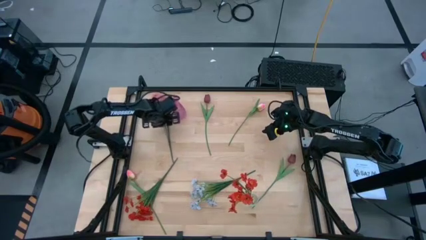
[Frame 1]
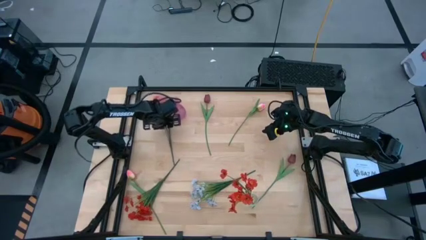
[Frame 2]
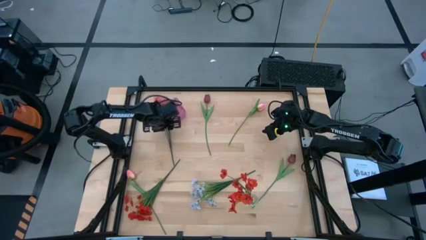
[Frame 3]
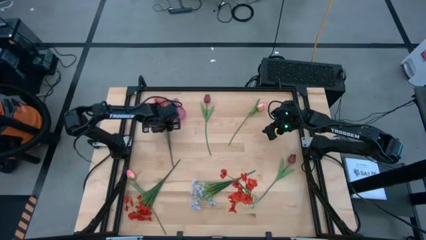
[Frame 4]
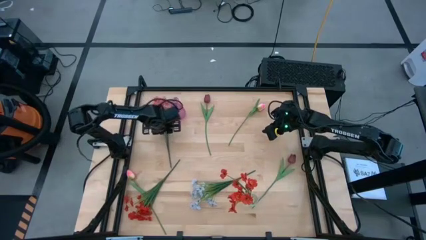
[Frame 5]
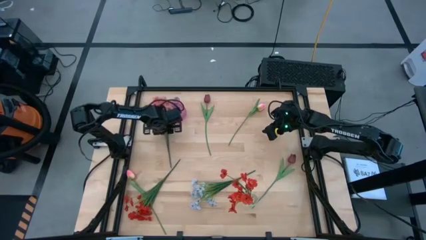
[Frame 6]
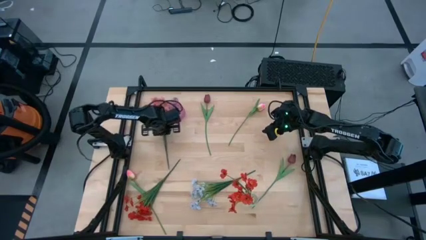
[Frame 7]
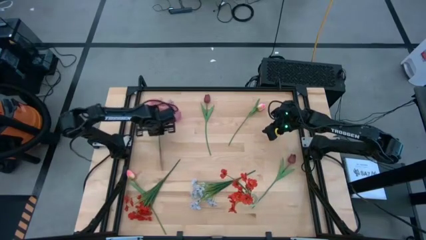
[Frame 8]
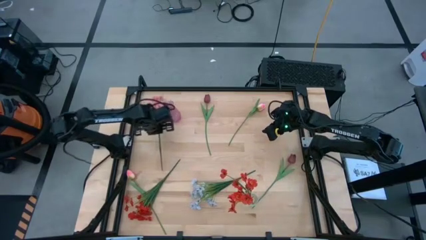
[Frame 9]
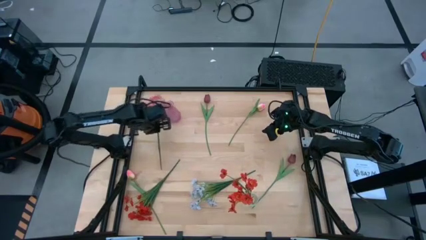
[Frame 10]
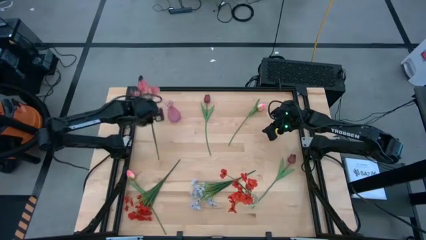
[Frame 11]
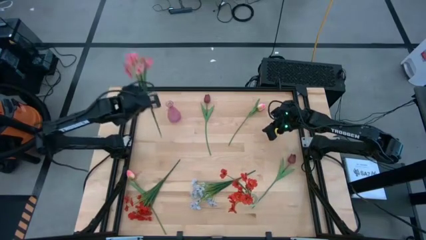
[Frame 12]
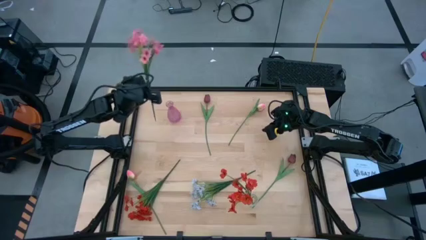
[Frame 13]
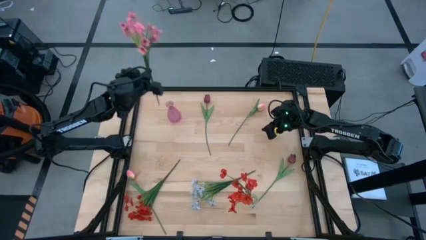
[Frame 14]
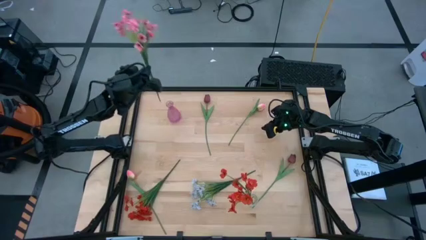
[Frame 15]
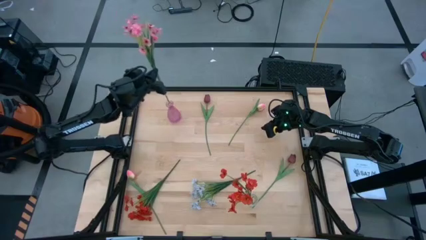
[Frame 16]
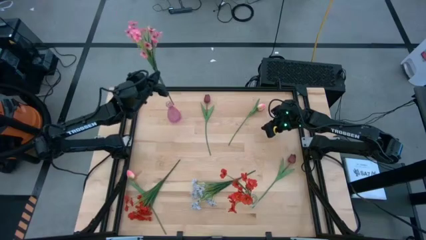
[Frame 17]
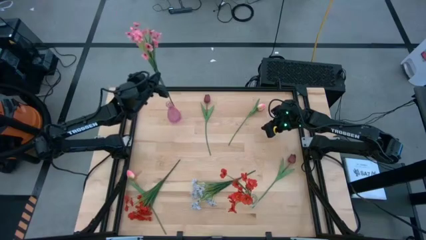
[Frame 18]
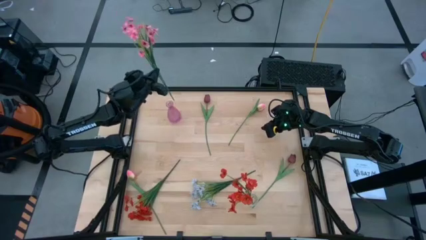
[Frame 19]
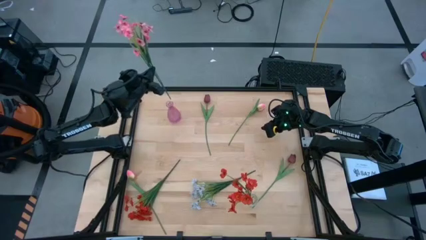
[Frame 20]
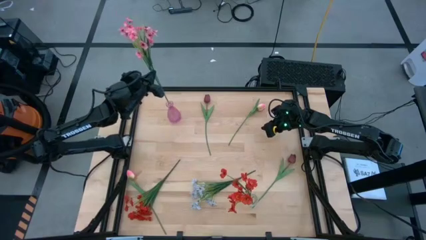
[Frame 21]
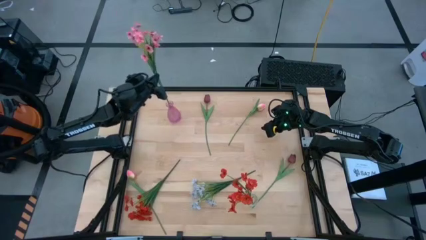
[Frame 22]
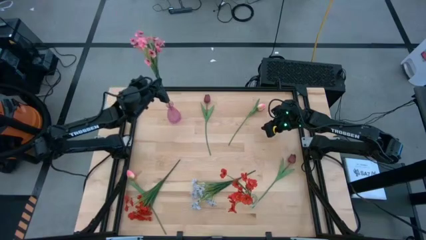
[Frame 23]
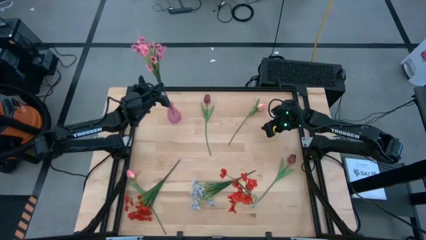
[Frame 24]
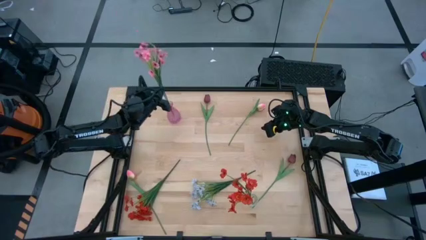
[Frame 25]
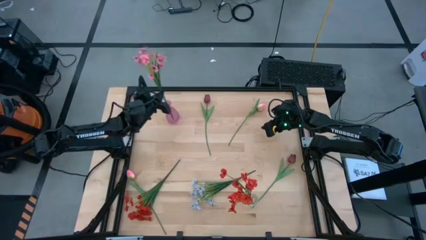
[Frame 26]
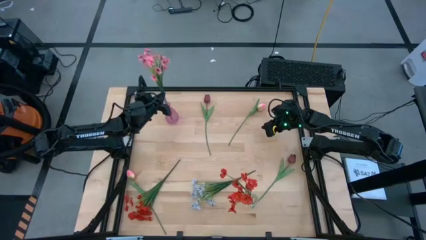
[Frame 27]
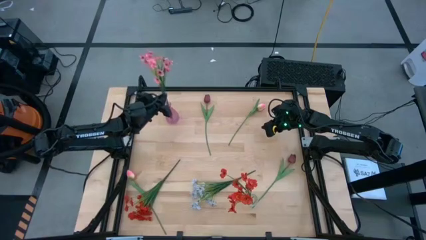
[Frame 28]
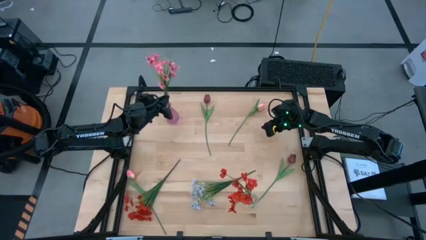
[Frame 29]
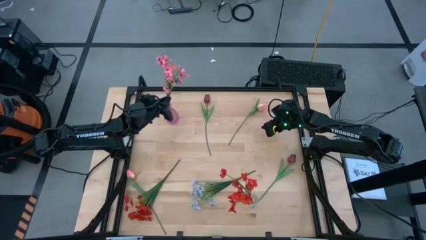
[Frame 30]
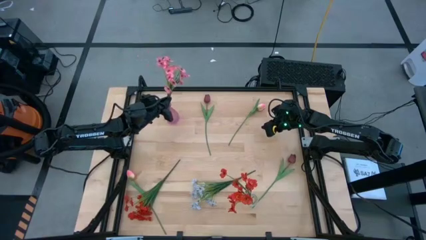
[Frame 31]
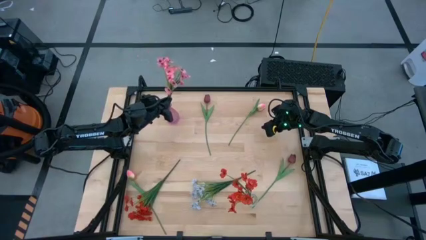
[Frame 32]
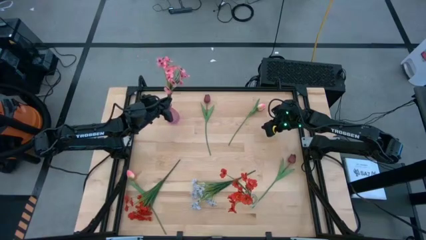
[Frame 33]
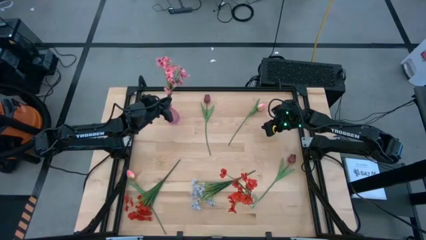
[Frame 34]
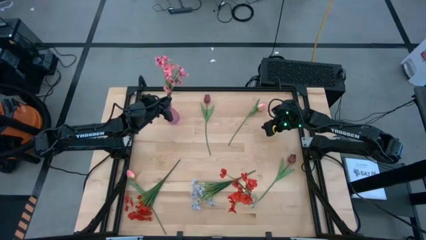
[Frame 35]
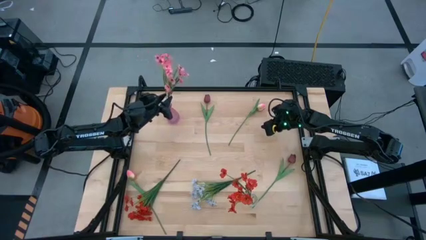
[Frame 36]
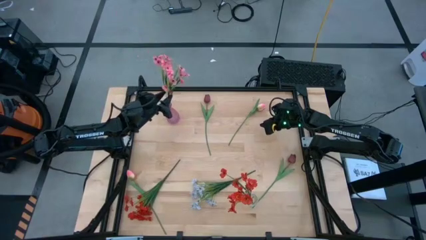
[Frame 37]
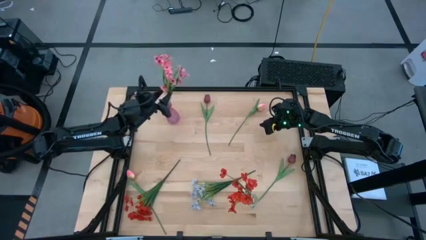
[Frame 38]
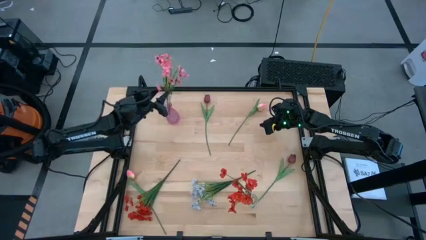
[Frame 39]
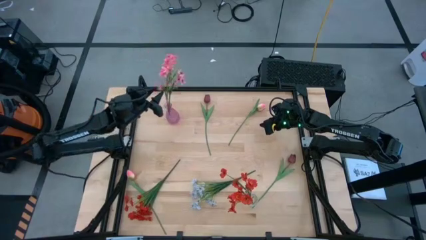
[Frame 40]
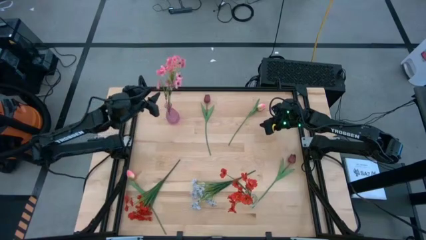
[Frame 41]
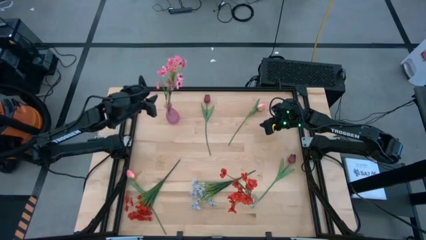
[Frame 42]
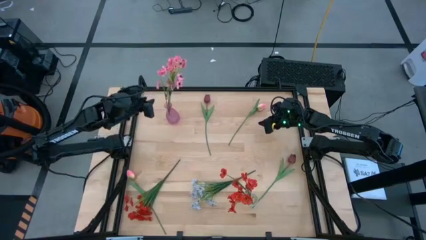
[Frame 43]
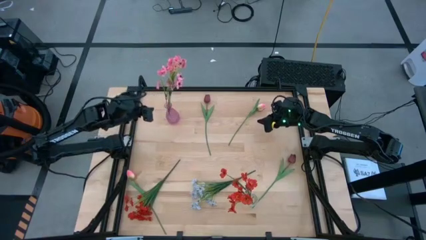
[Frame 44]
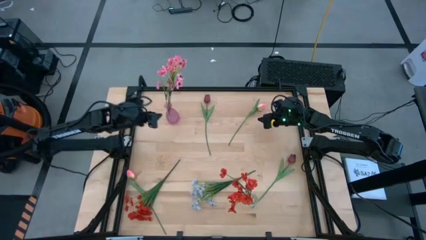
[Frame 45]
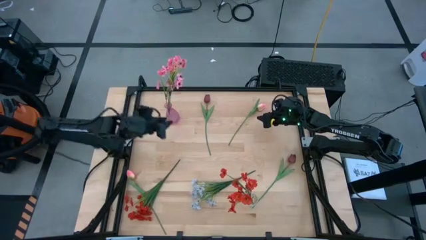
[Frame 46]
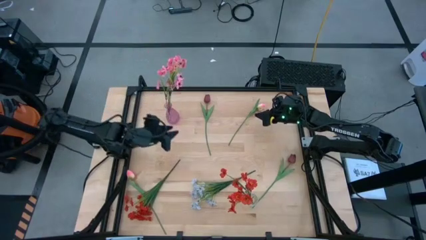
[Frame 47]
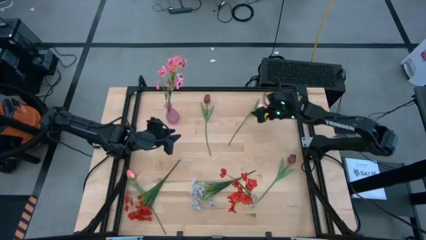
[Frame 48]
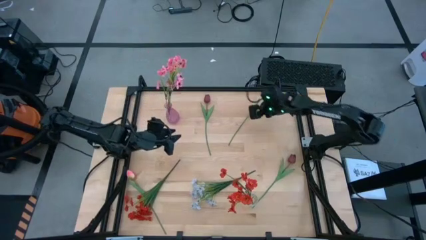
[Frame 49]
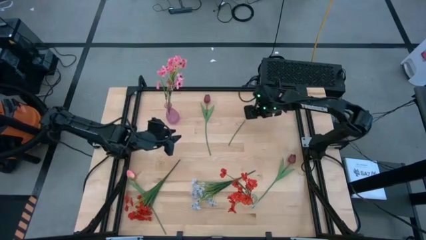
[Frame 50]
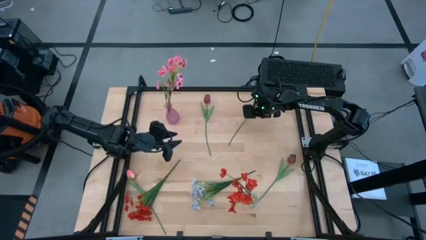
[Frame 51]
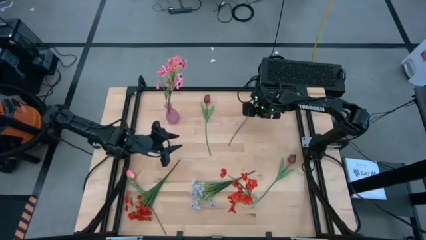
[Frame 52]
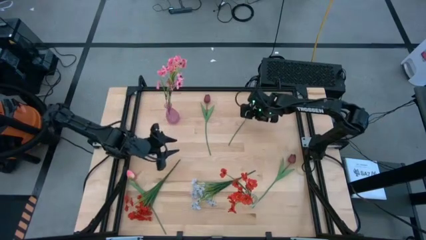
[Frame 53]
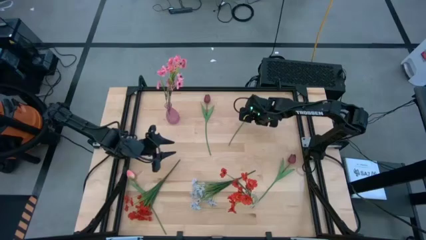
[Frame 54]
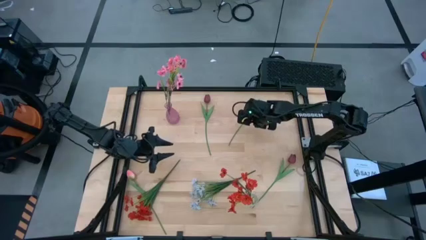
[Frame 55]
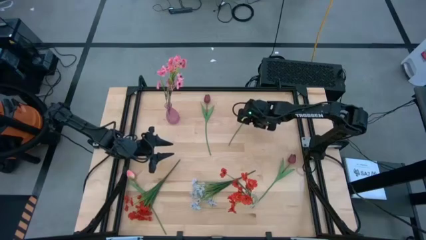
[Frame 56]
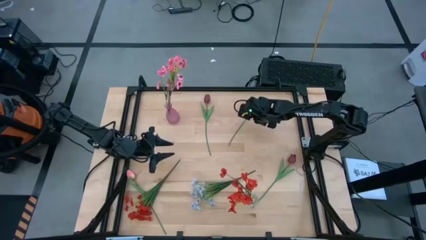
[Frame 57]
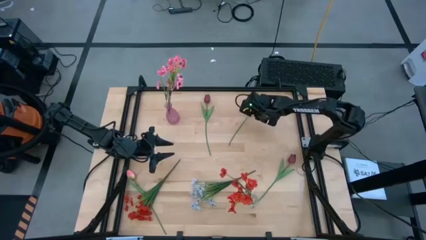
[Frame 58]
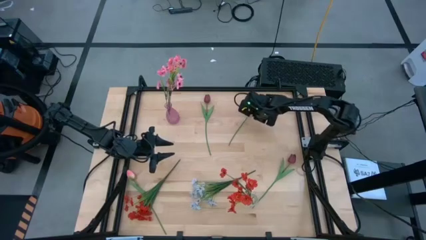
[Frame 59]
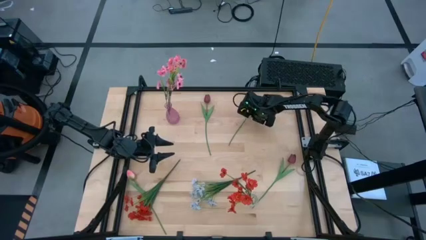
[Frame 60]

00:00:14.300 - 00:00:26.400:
Task: Sort flowers into vase by color
Put the pink flowers into the pink vase
